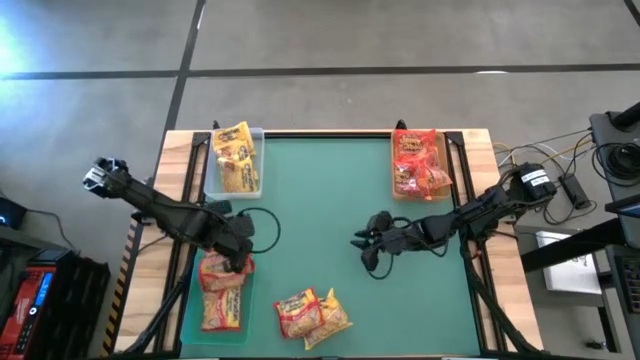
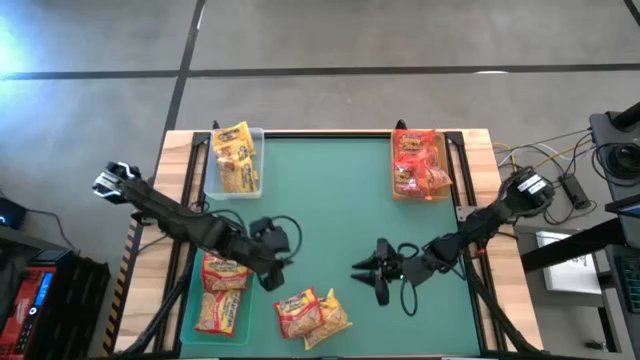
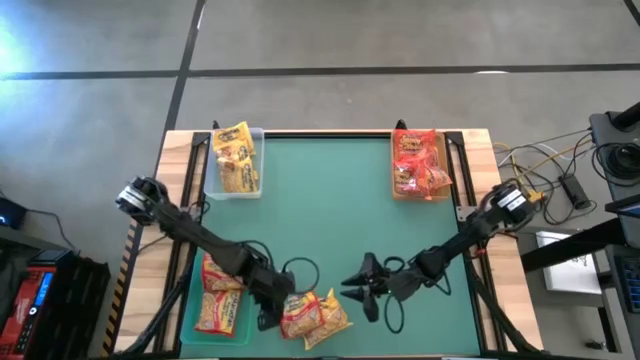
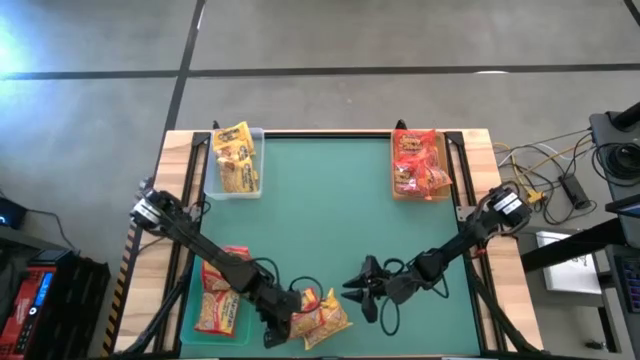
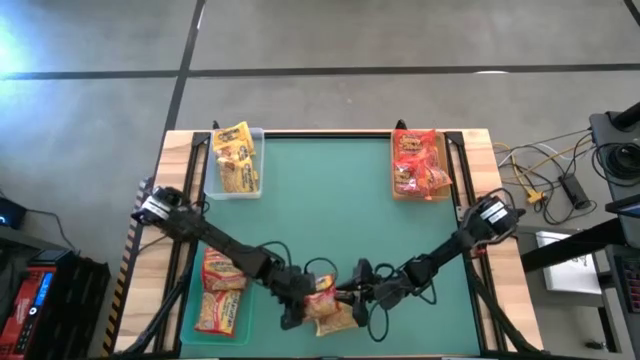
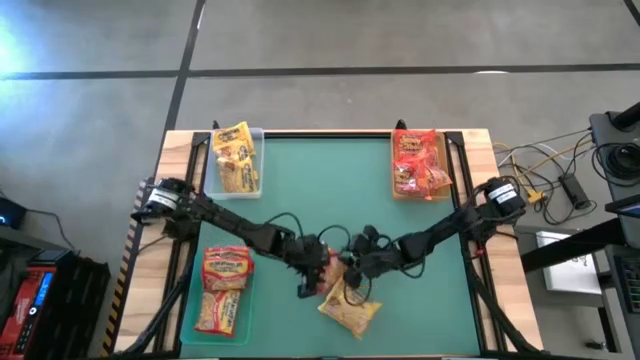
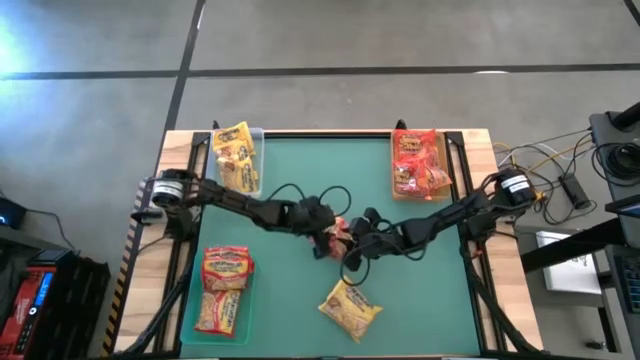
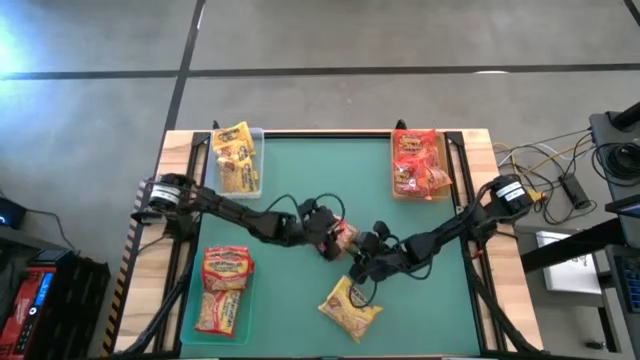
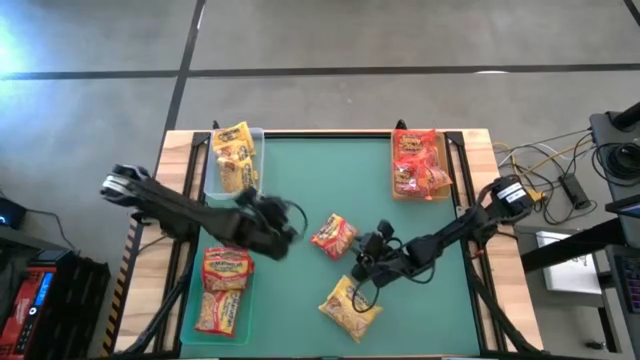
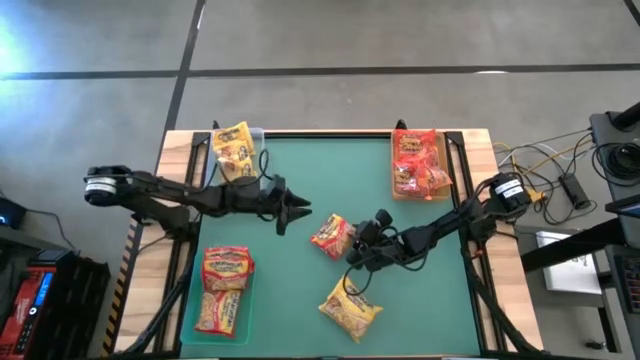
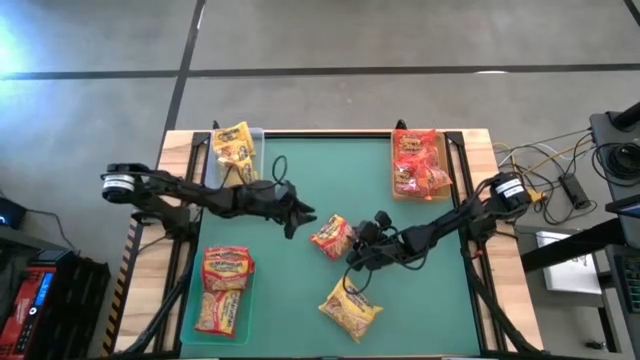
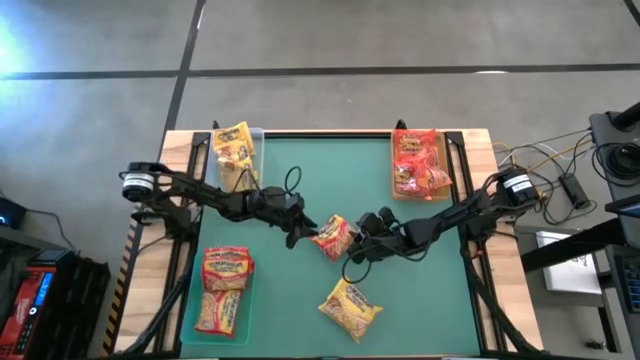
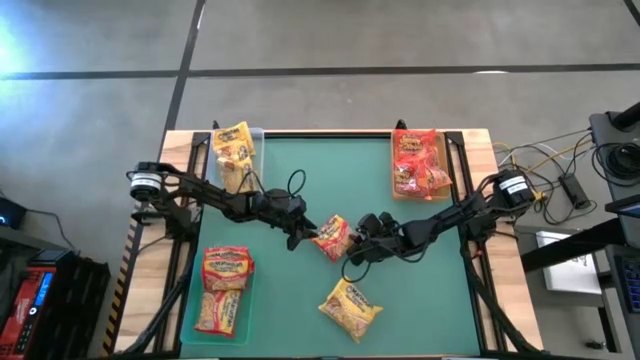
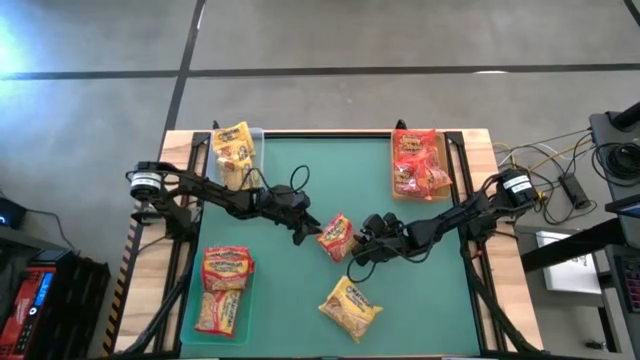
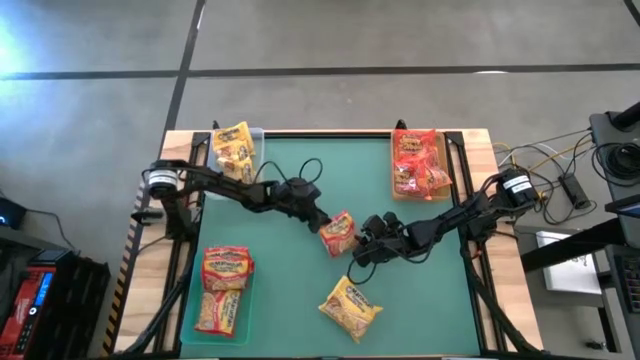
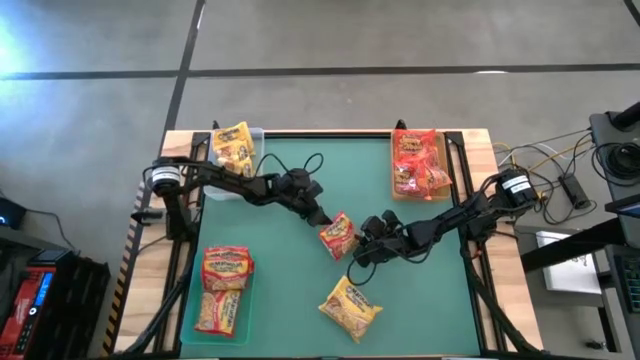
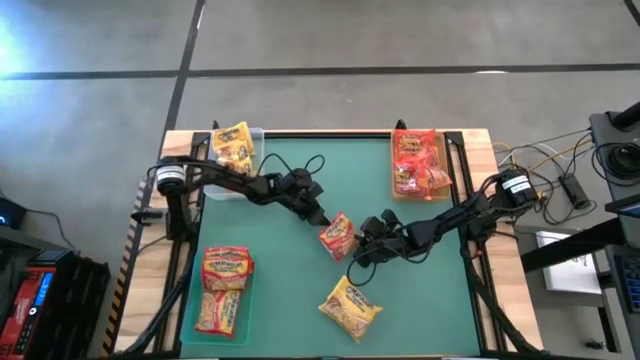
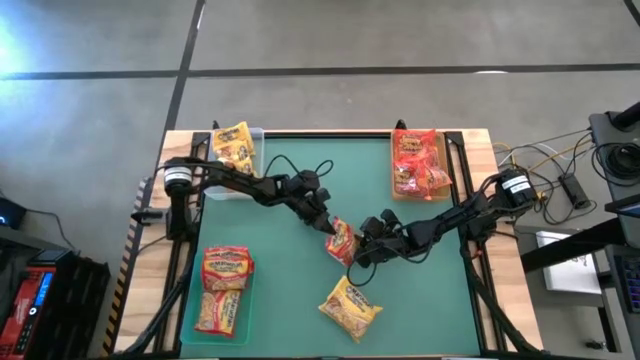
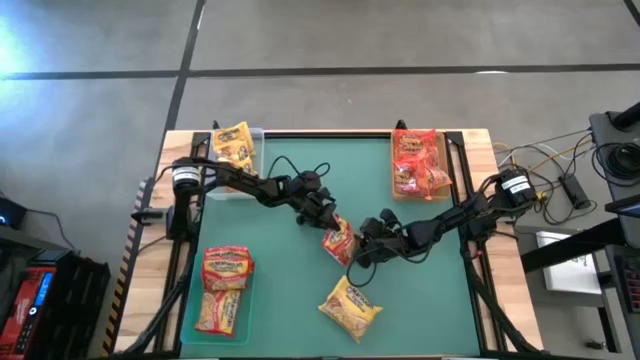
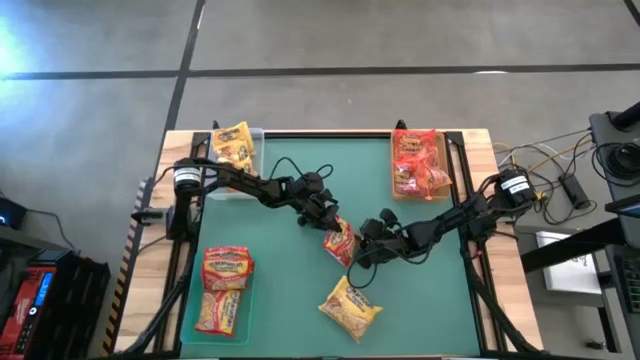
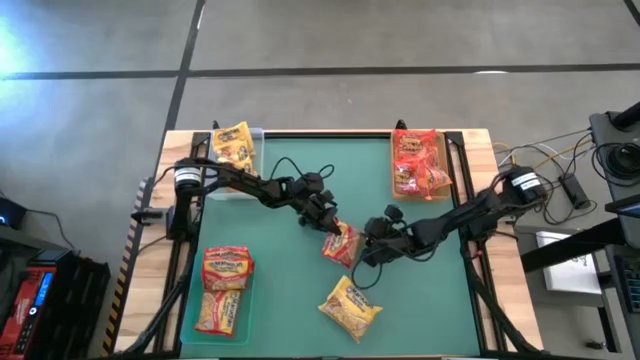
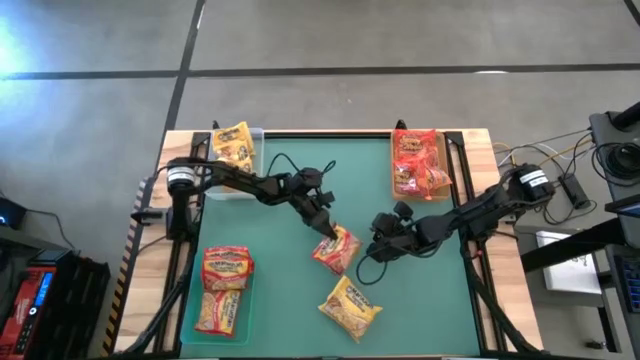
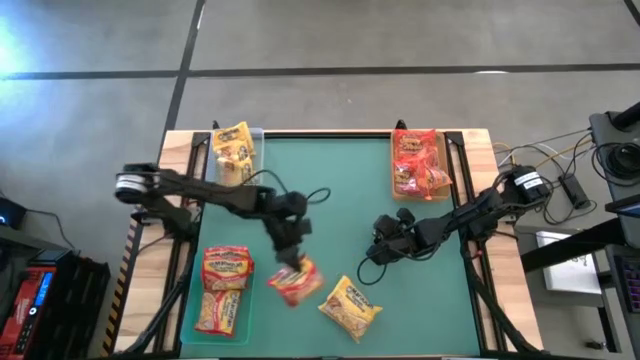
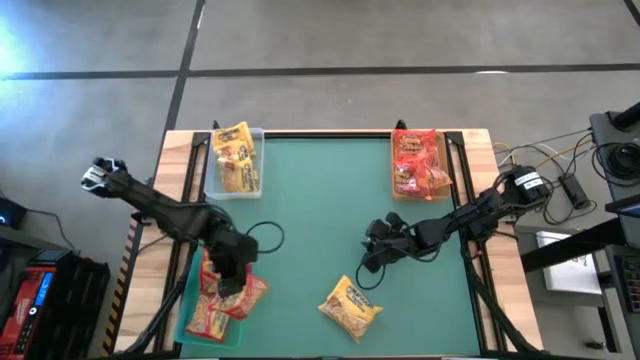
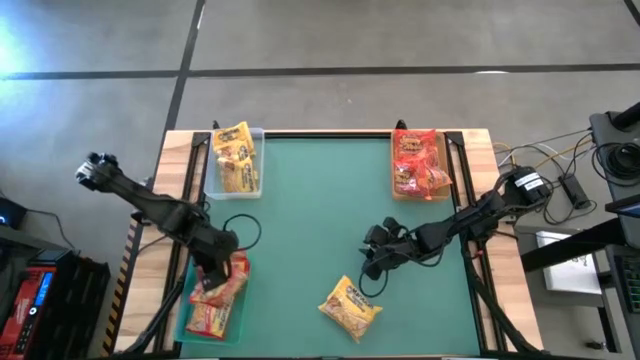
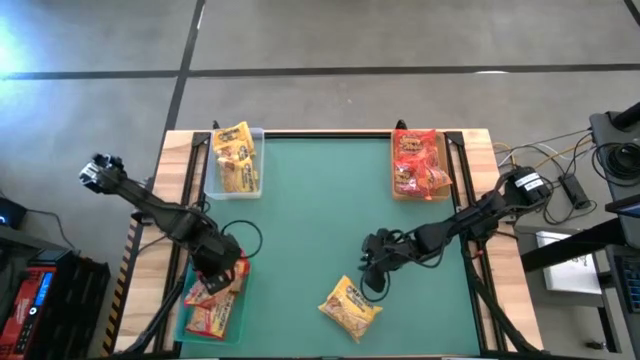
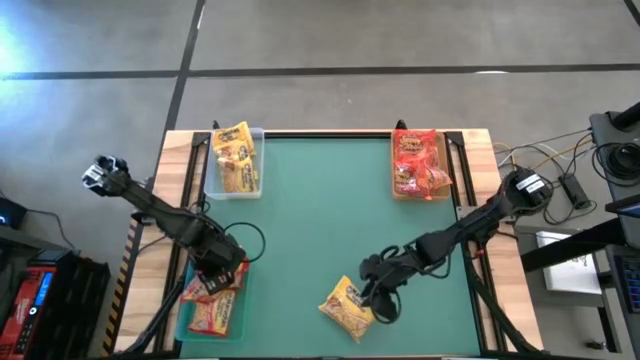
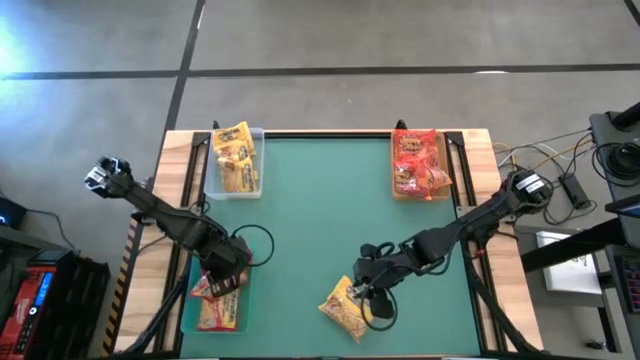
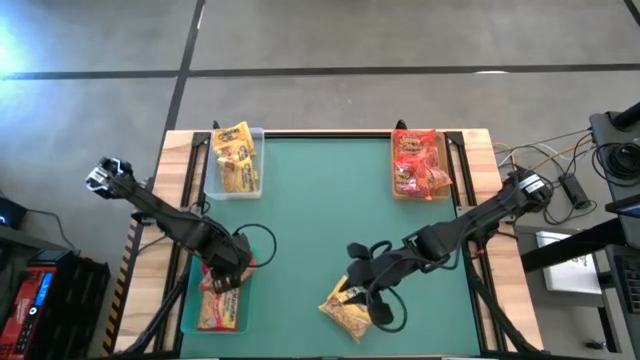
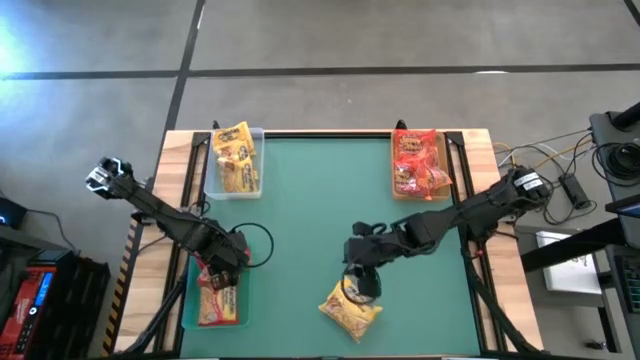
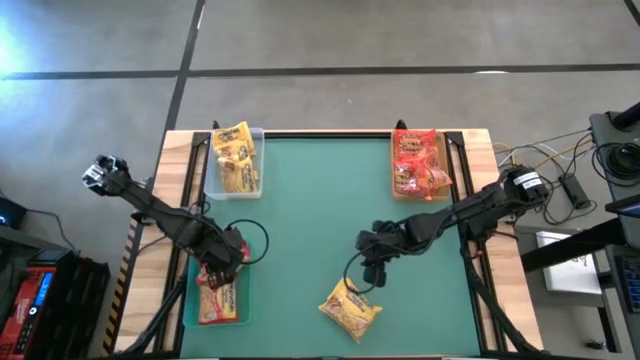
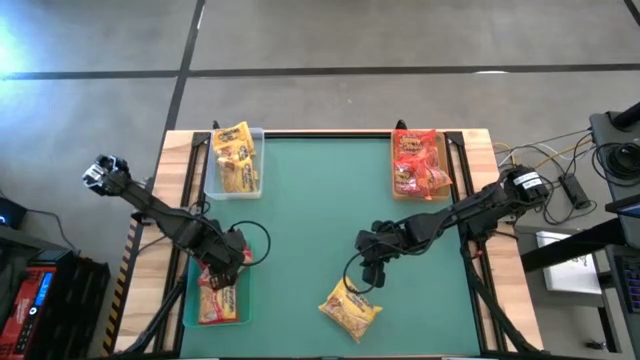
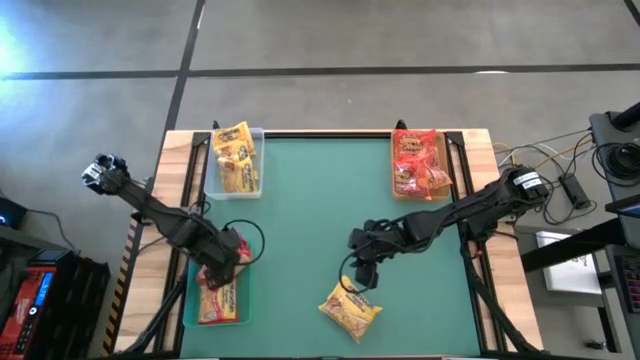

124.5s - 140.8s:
Task: Sort Maruchan noodles
Put the red noodle pack into the green bin

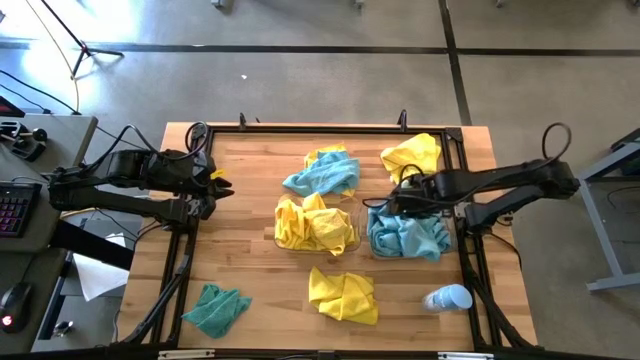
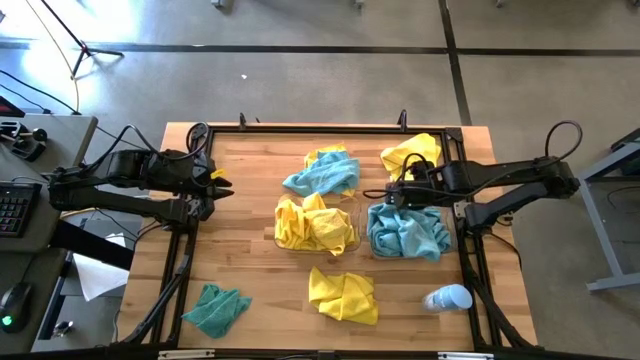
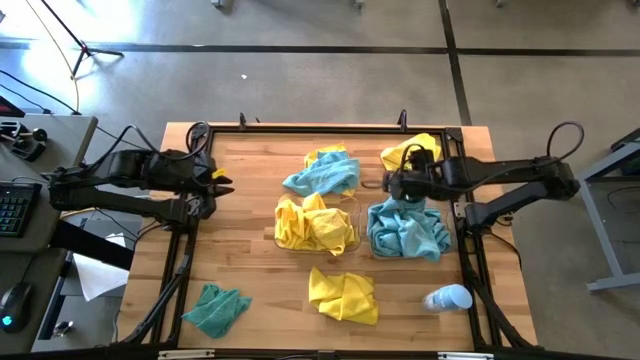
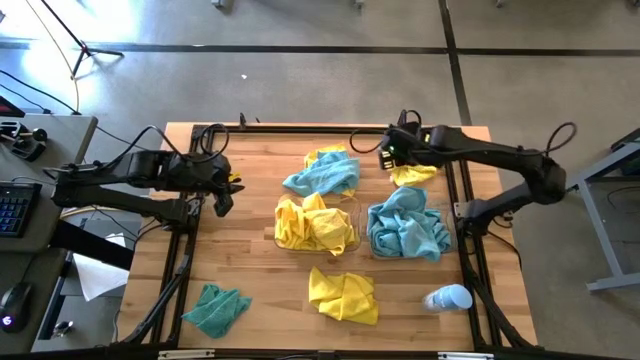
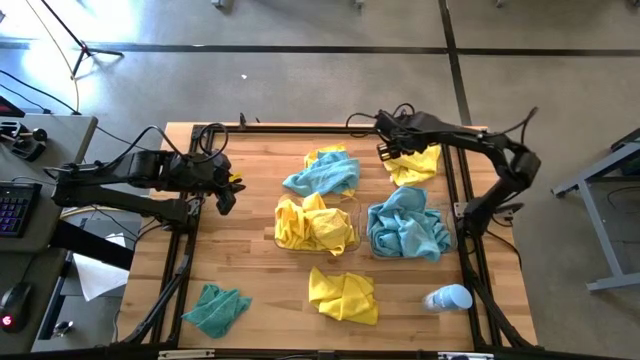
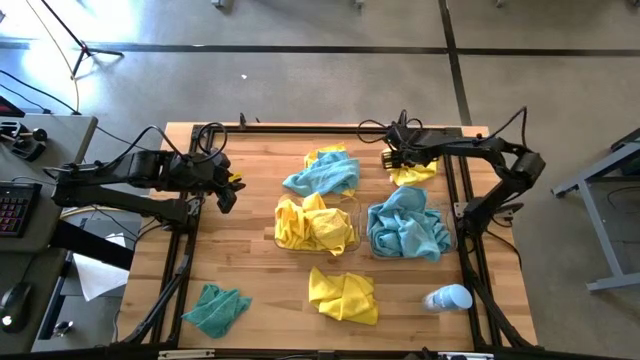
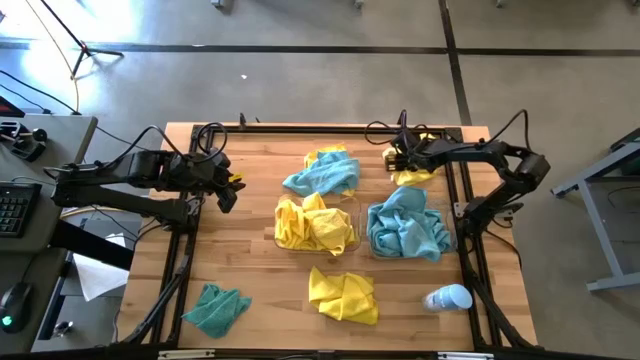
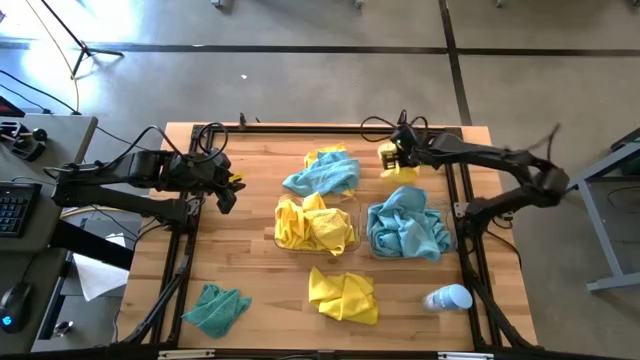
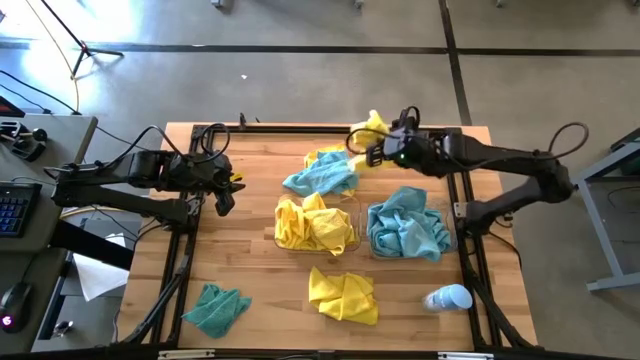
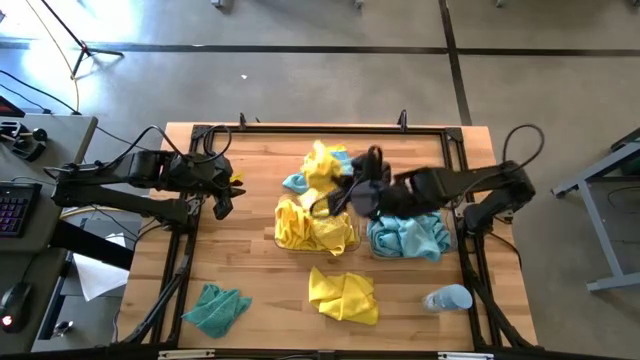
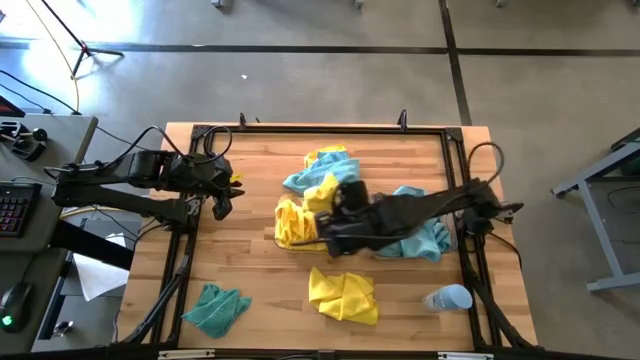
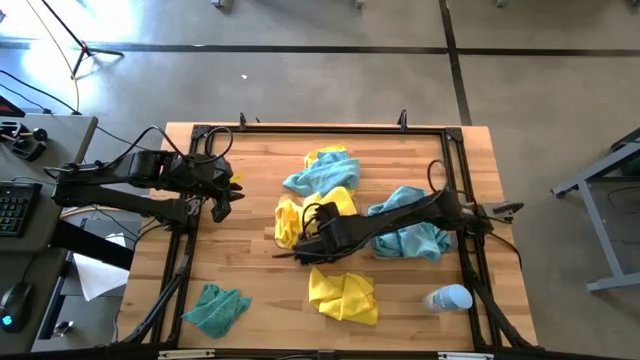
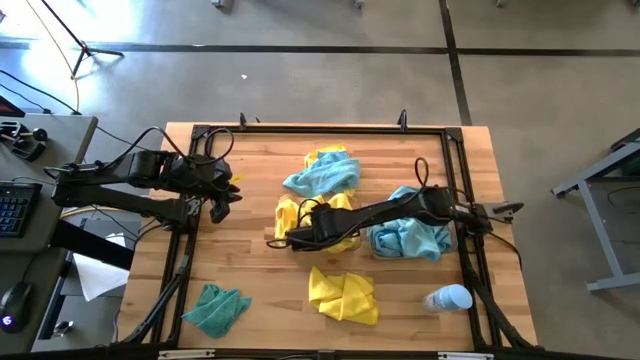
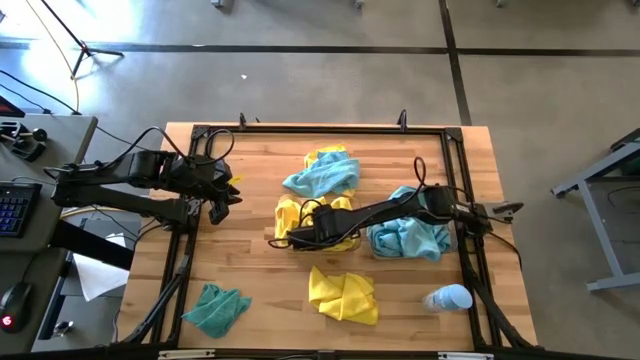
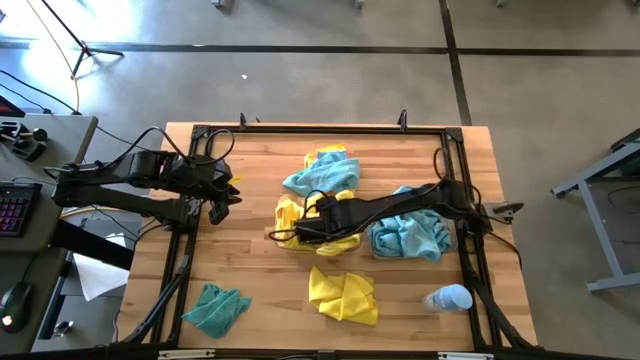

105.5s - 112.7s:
Task: Sort microfiber towel by color & place in baskets
Put the yellow microfiber cloth into the left transparent bin
